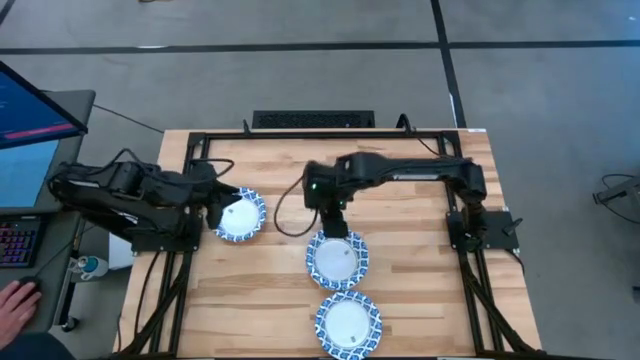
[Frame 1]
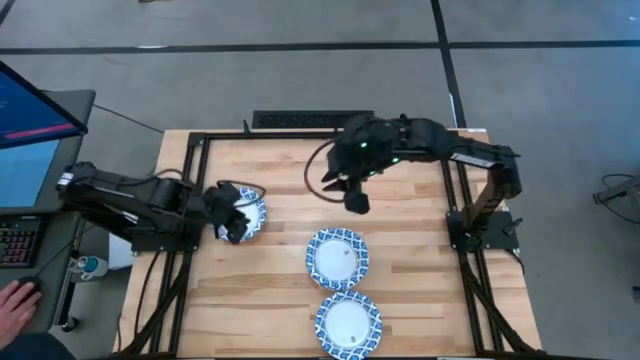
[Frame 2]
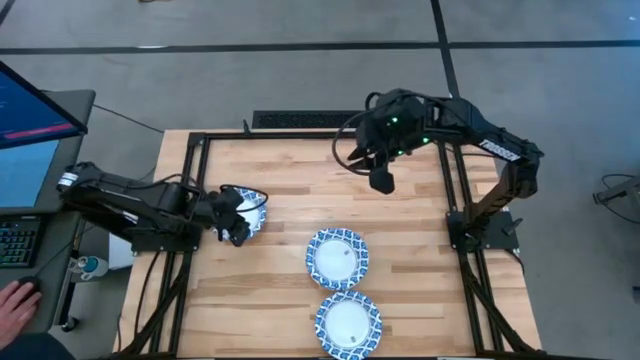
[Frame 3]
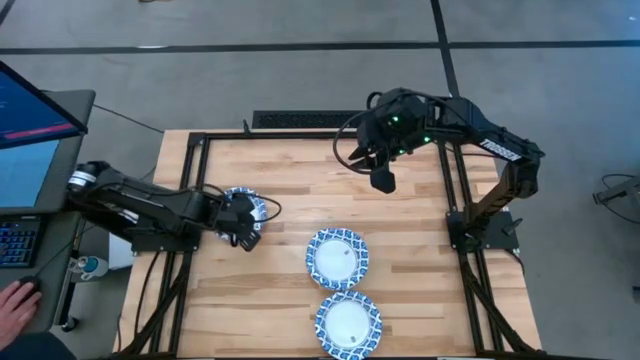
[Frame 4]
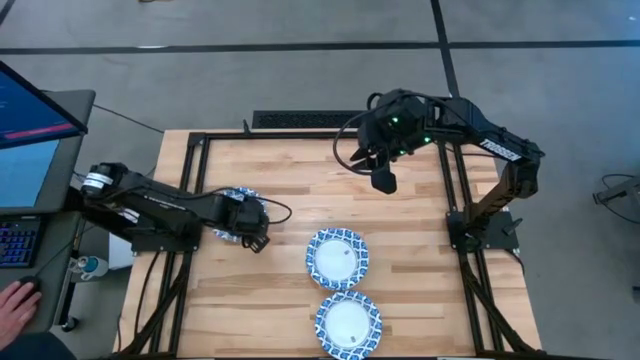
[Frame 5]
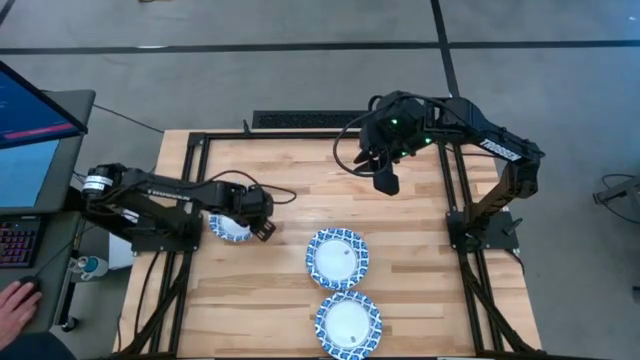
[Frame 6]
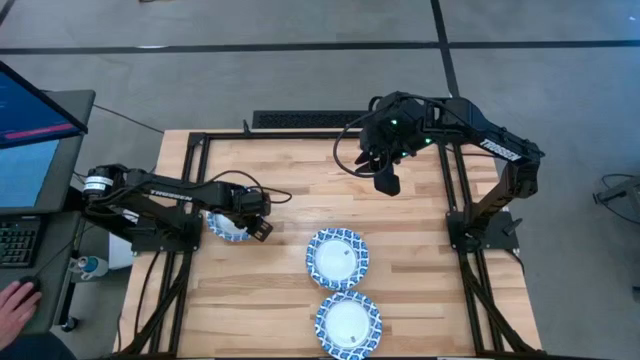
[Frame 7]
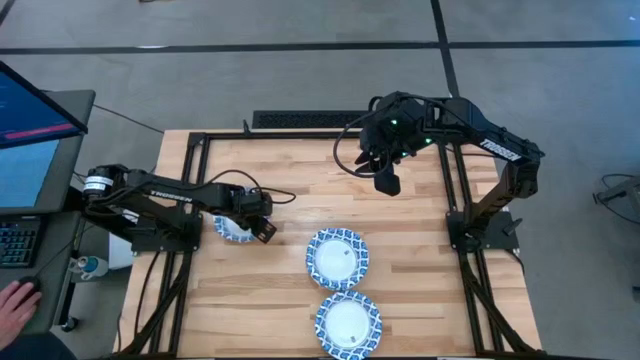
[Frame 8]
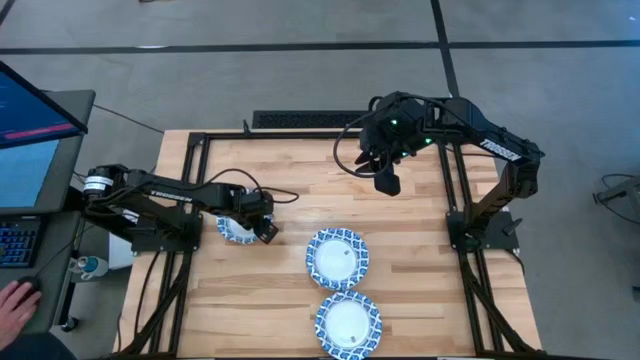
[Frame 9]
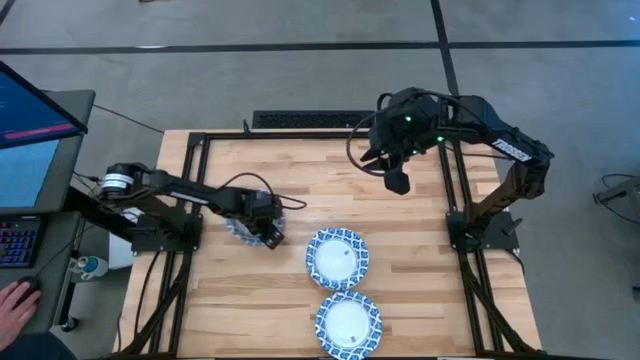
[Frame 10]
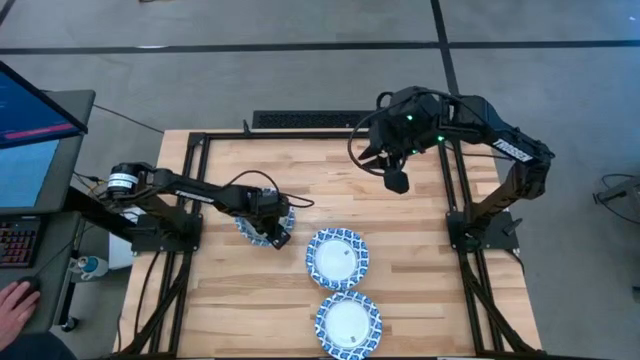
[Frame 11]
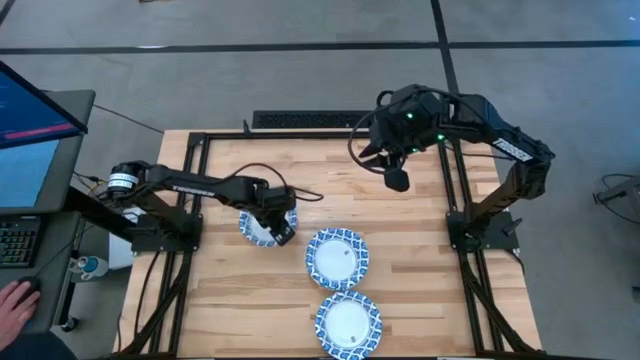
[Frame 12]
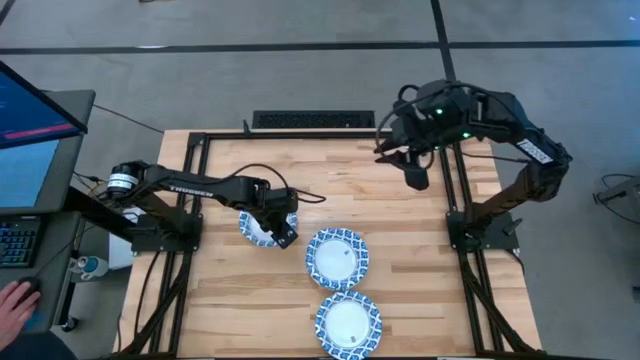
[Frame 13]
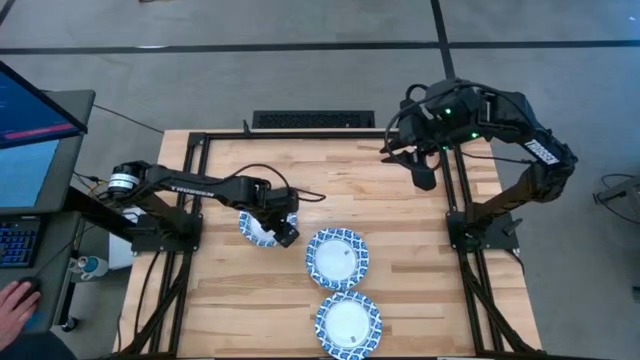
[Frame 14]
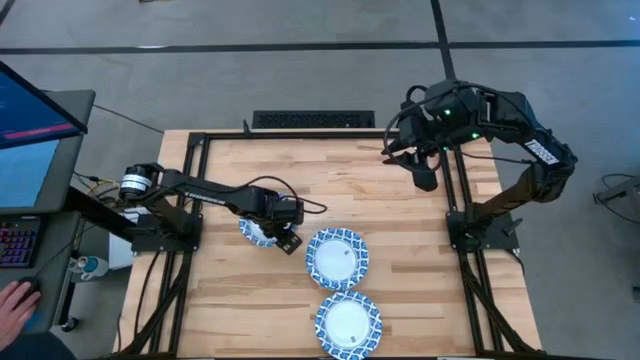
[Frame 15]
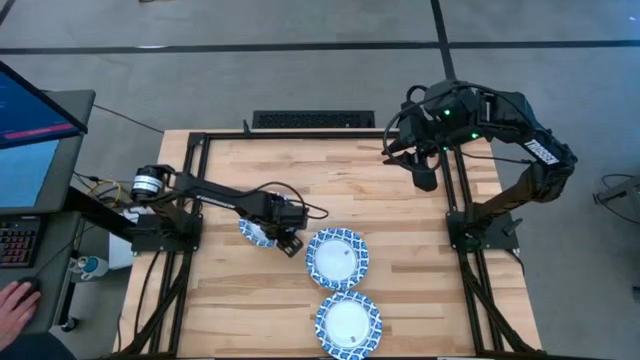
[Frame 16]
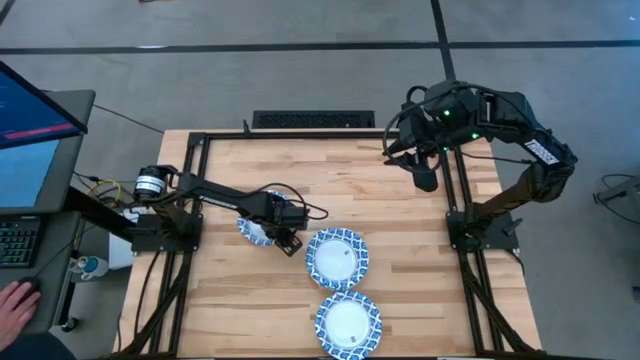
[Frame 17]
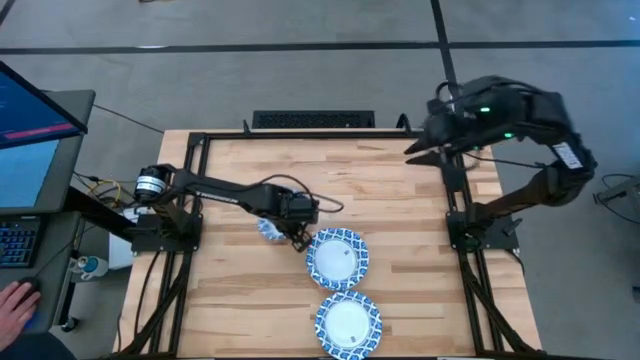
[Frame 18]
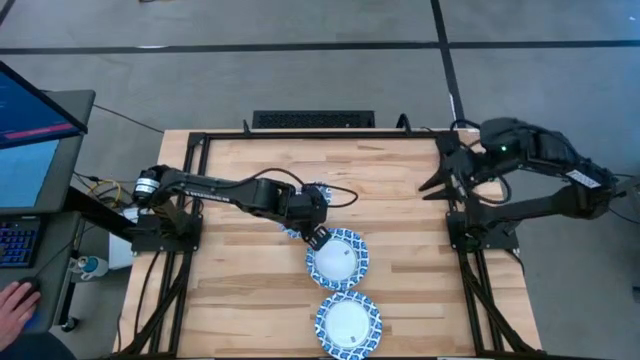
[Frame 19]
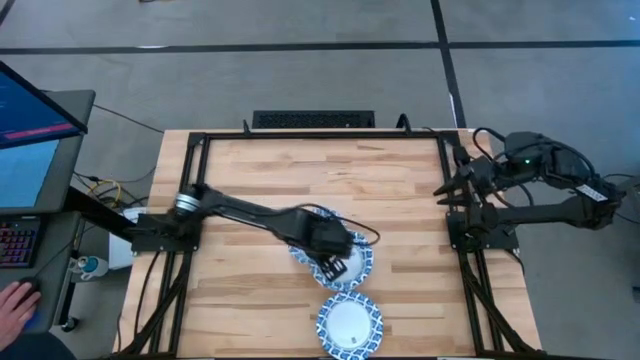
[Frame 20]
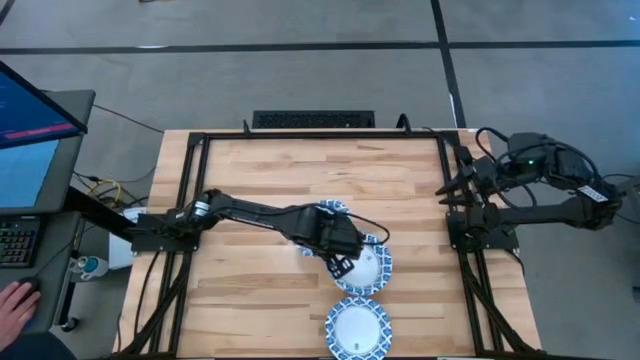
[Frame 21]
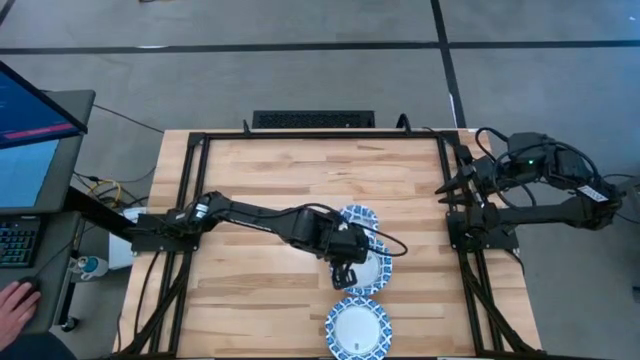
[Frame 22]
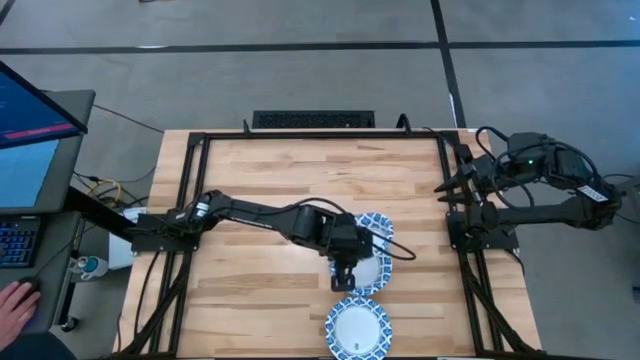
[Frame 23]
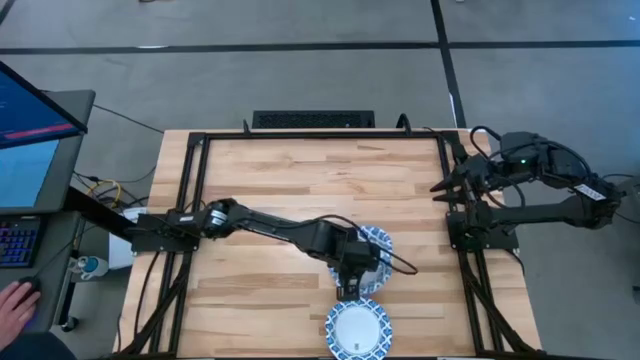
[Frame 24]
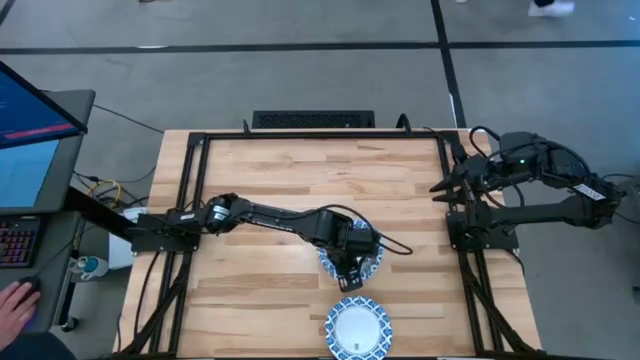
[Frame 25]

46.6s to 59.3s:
Task: Nest bowls inside each other
Stack the blue patterned bowl on the blue patterned bowl

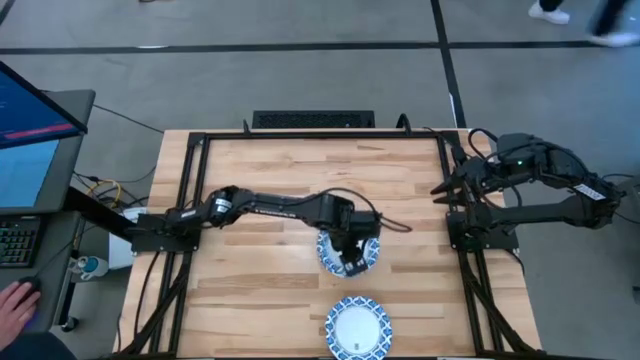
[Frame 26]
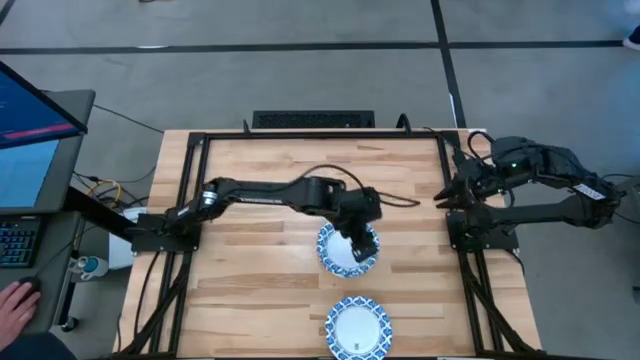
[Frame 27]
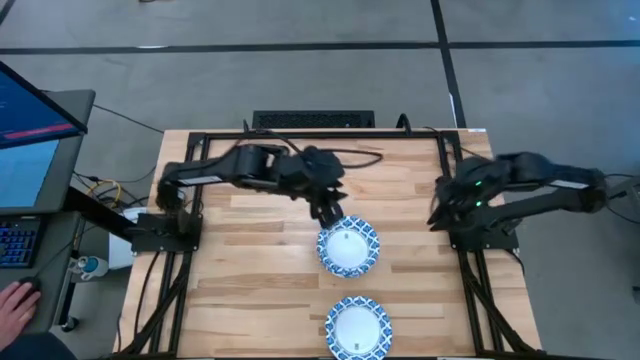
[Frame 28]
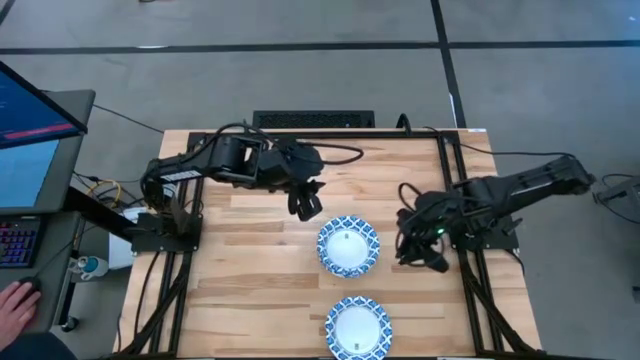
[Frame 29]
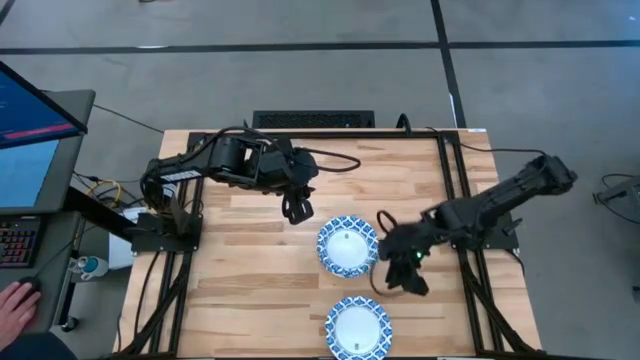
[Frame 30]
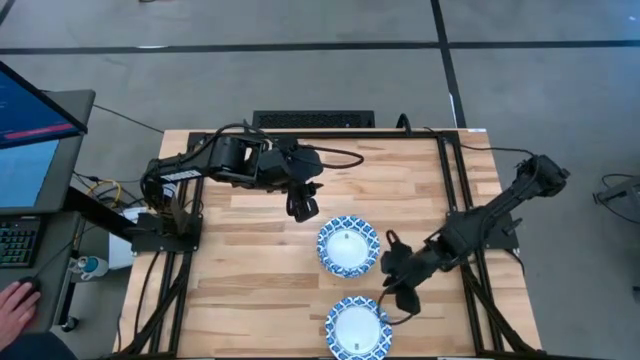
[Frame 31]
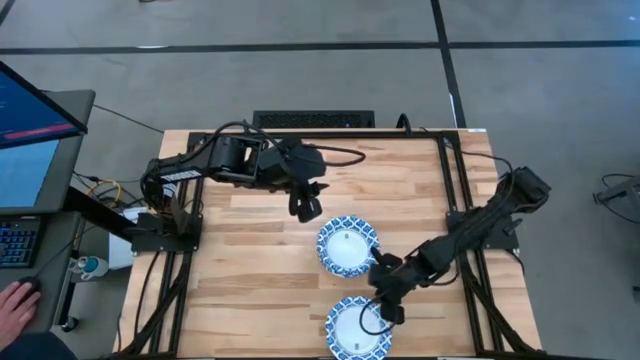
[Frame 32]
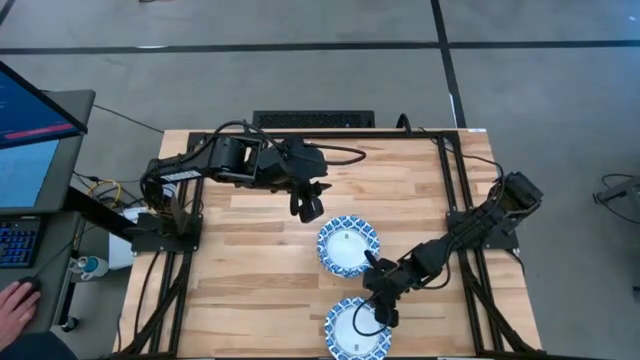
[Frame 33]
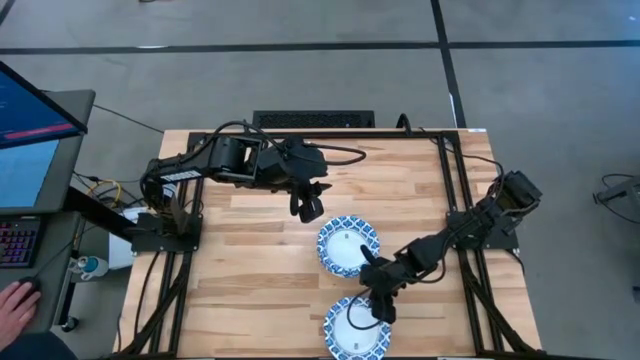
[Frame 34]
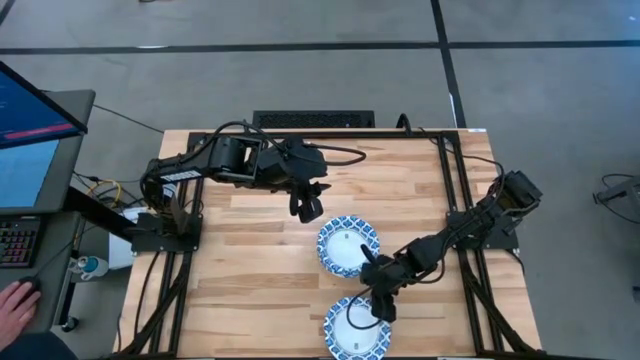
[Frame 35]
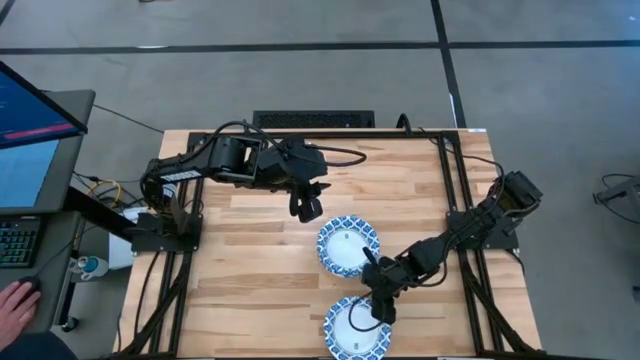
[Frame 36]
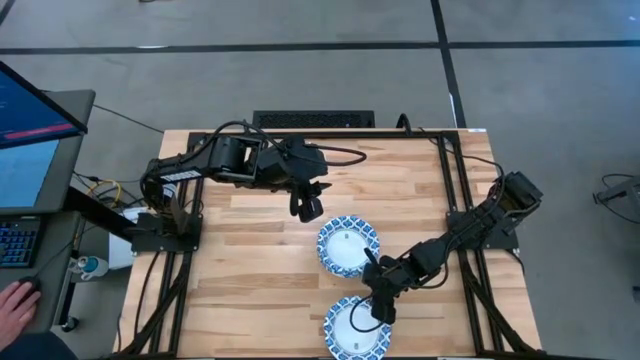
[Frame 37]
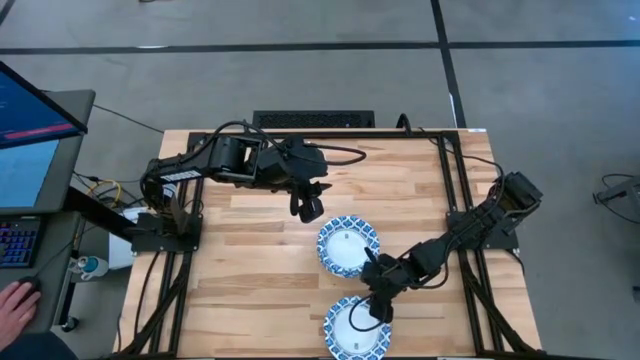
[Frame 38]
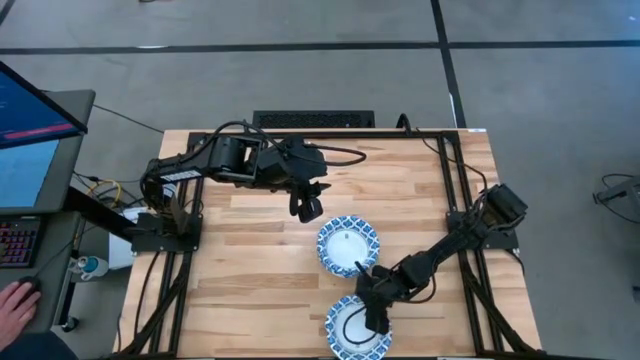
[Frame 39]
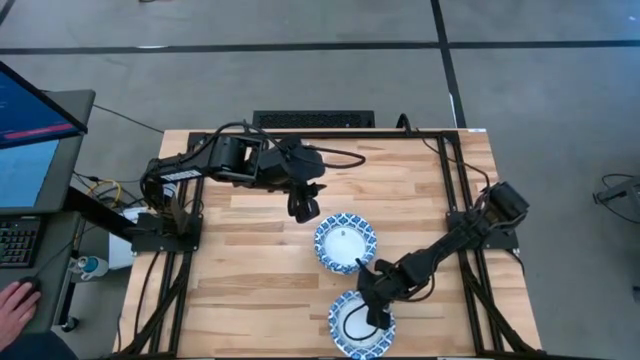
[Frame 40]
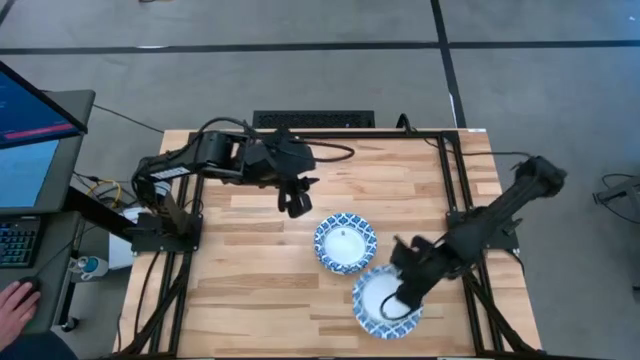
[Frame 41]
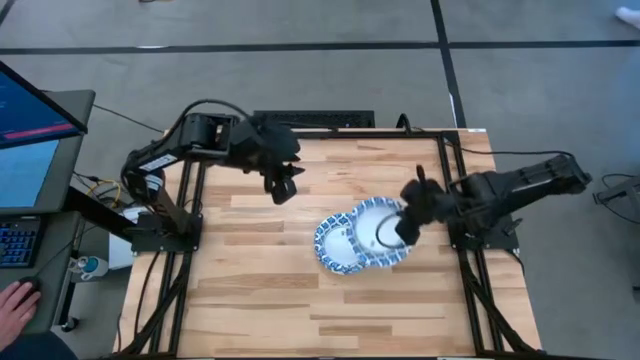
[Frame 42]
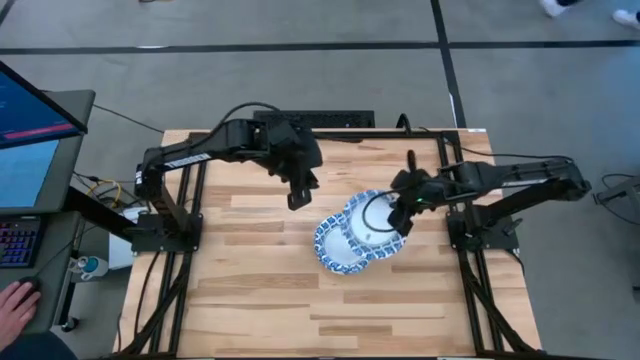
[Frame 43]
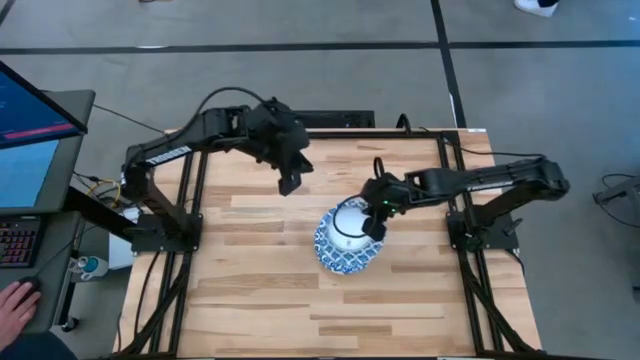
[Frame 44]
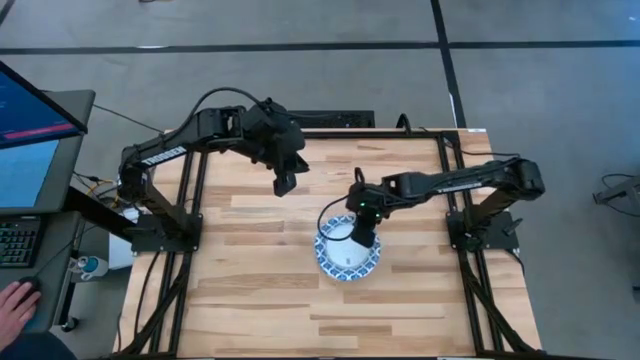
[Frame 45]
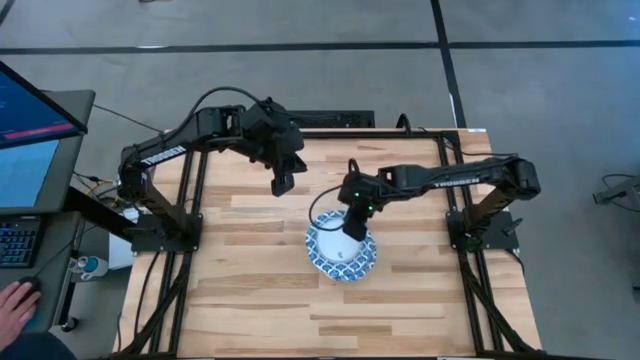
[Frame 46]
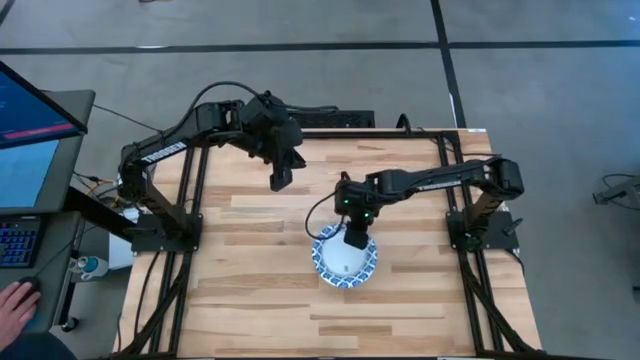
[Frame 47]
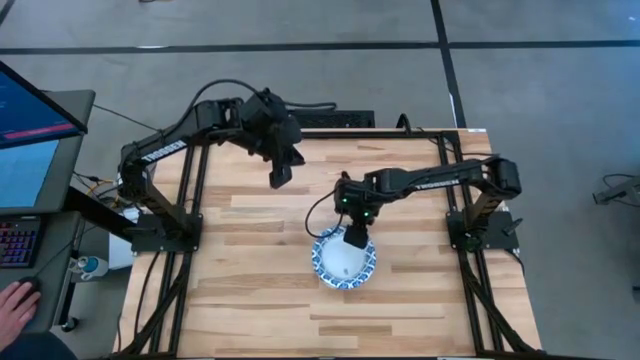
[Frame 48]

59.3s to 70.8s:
Stack the blue patterned bowl on the blue patterned bowl
